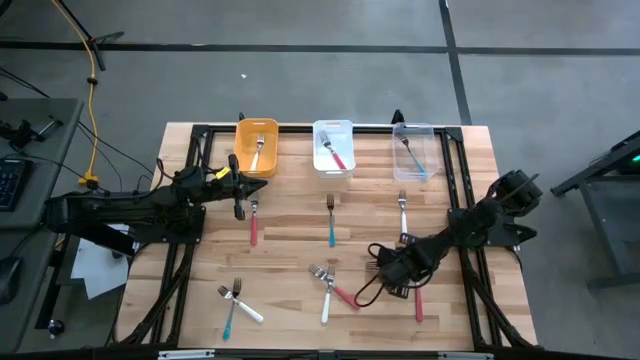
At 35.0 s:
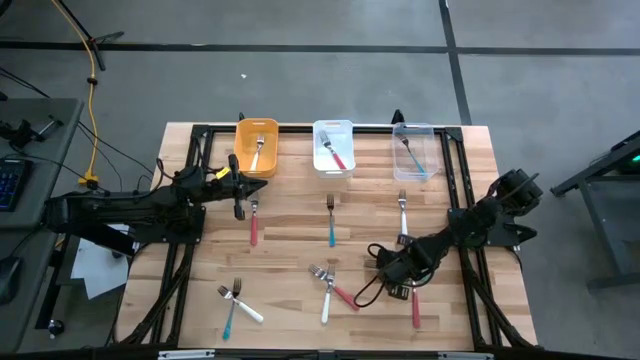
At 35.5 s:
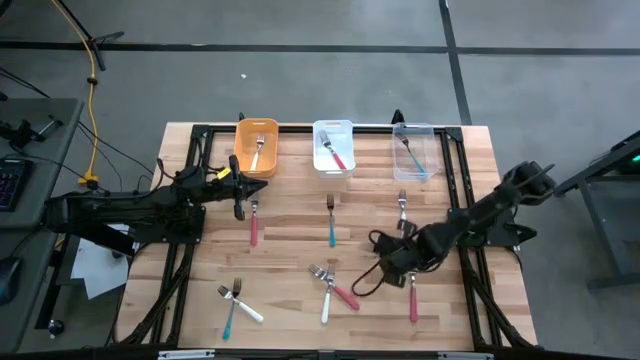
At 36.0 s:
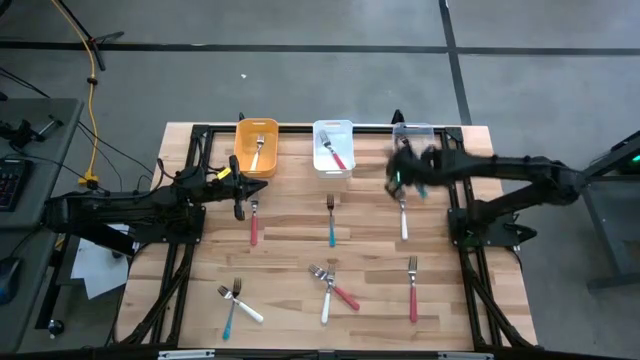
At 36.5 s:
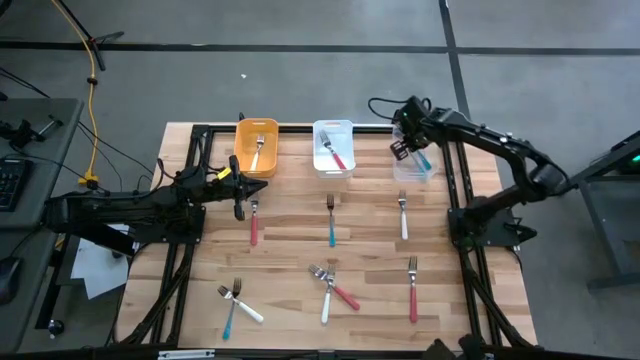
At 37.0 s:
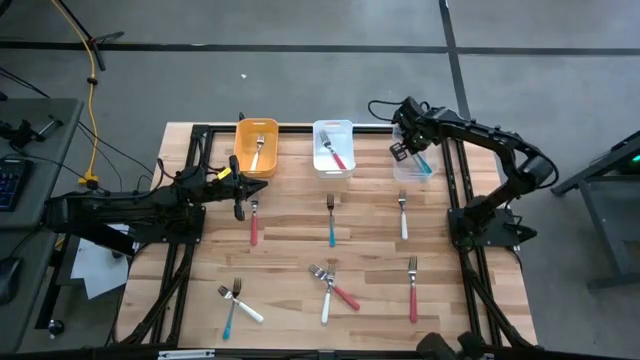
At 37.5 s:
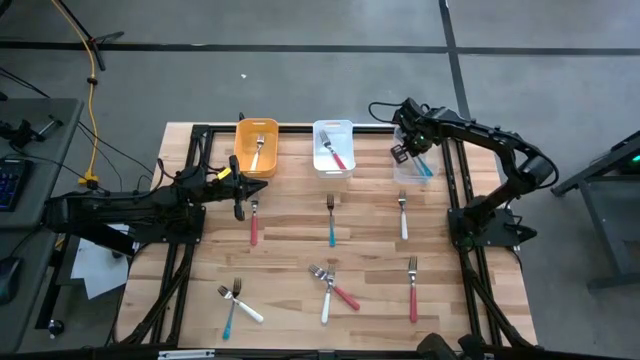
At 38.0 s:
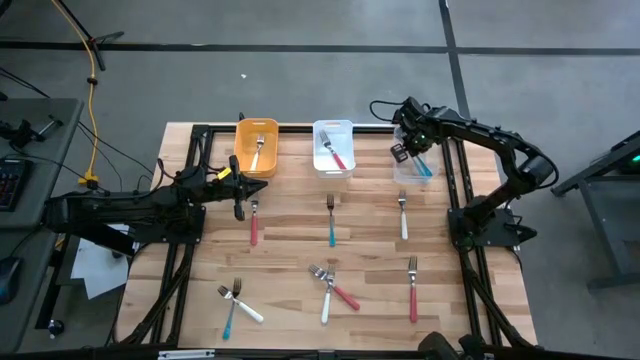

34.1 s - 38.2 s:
Task: Sort silverware by color (type)
Put the bottom right blue fork into the transparent bin

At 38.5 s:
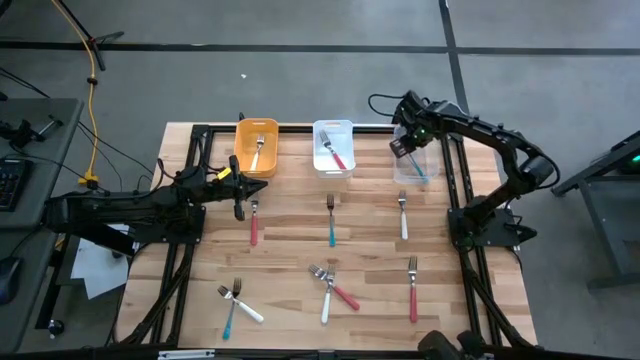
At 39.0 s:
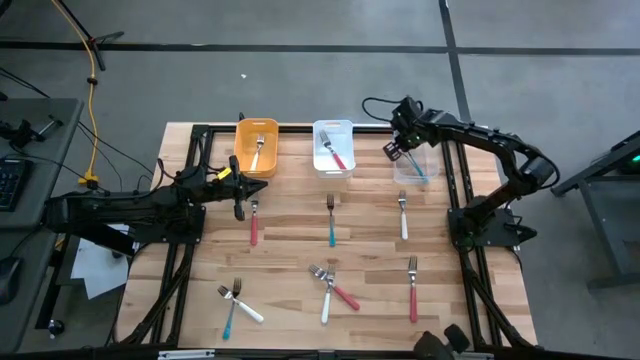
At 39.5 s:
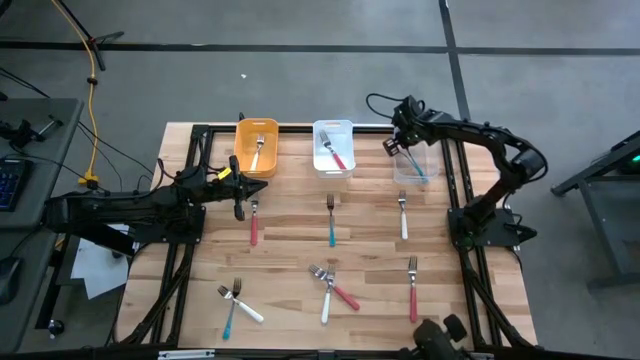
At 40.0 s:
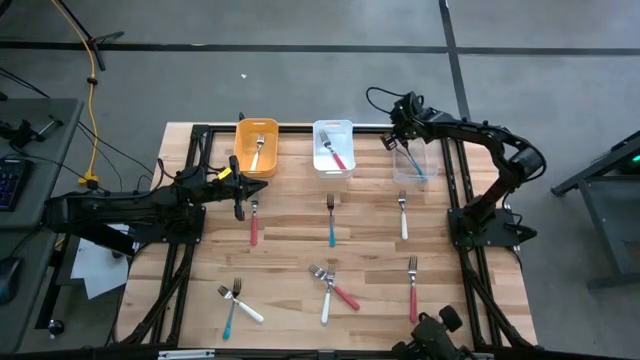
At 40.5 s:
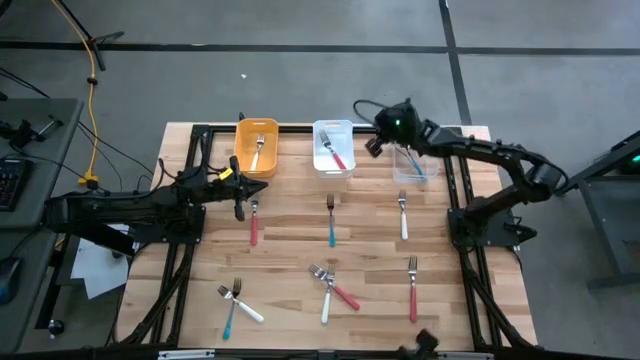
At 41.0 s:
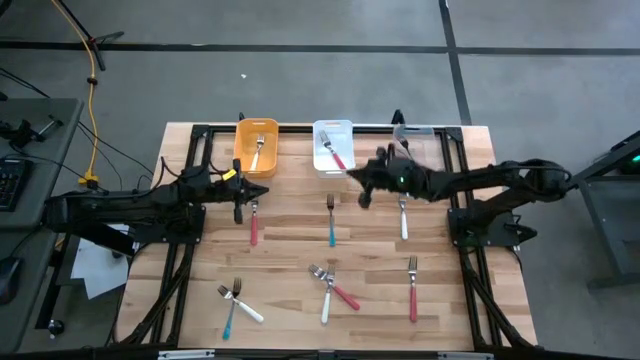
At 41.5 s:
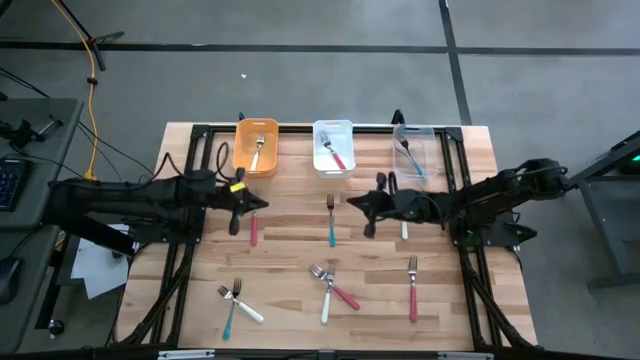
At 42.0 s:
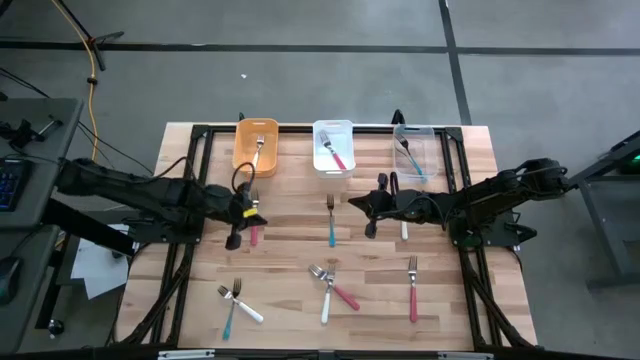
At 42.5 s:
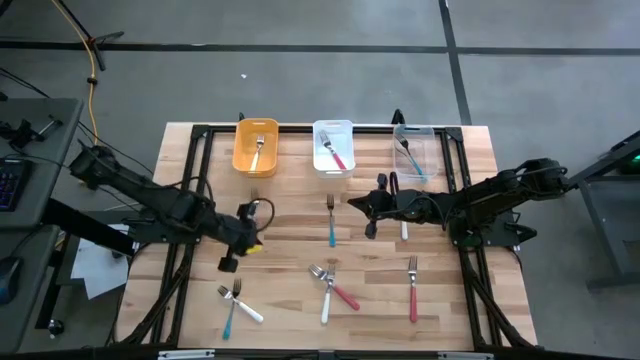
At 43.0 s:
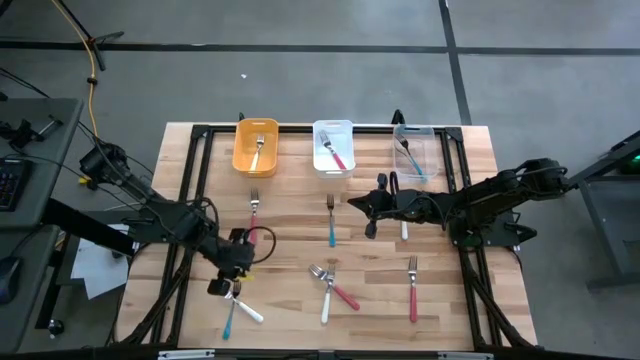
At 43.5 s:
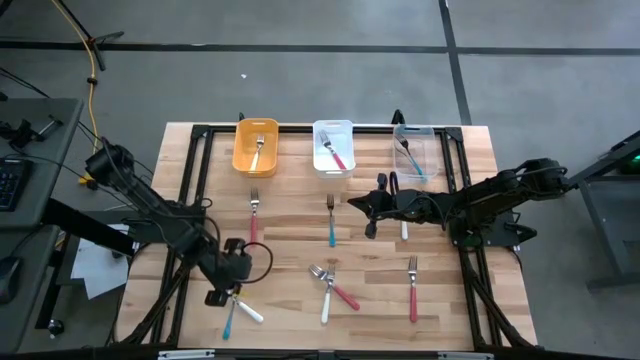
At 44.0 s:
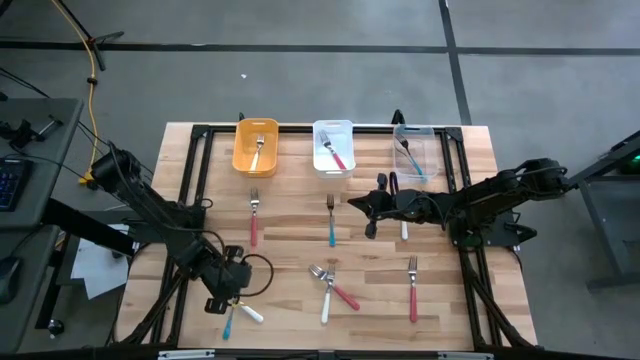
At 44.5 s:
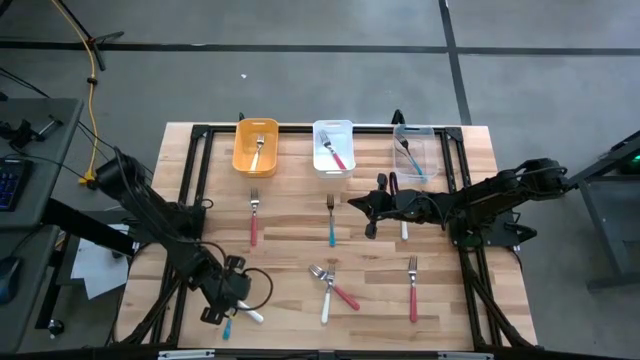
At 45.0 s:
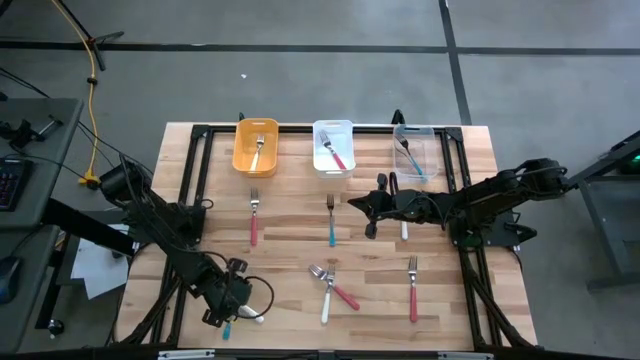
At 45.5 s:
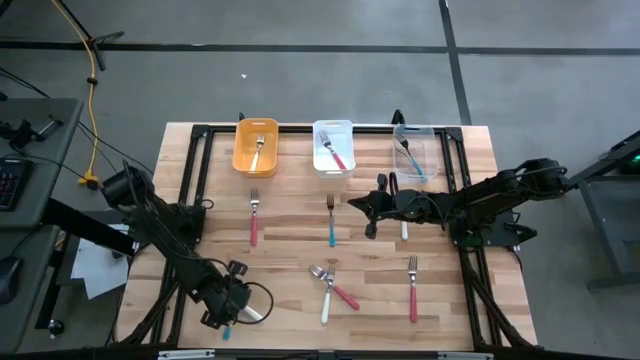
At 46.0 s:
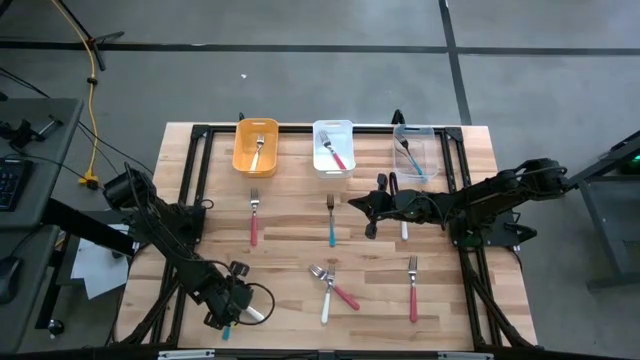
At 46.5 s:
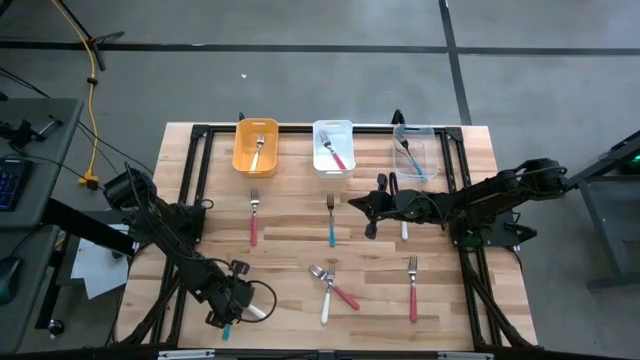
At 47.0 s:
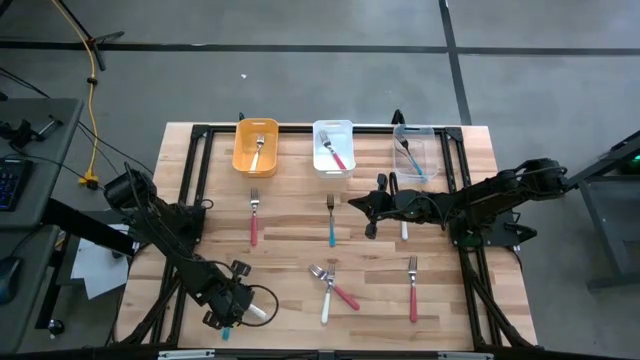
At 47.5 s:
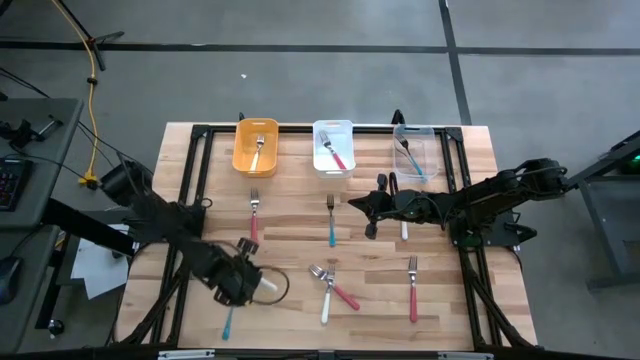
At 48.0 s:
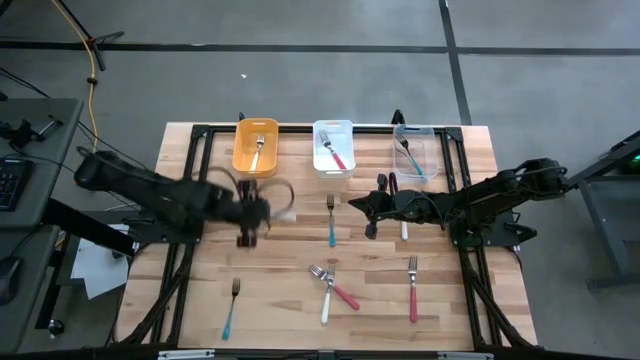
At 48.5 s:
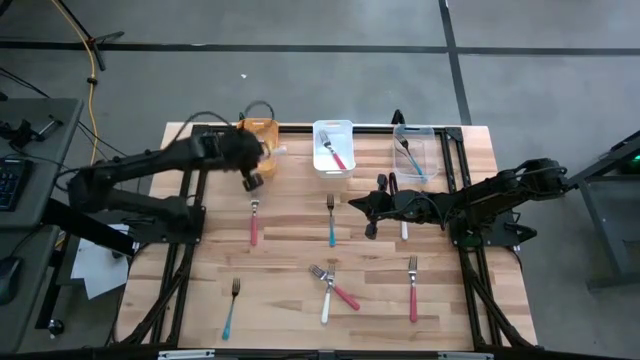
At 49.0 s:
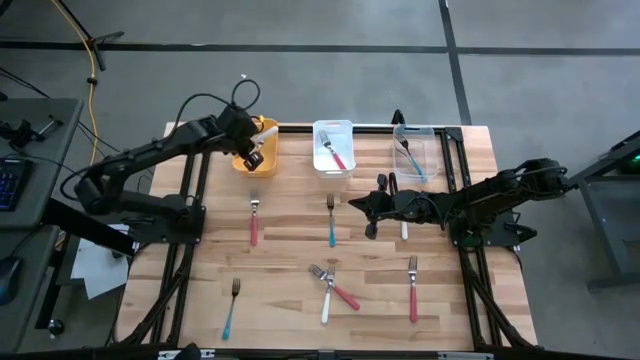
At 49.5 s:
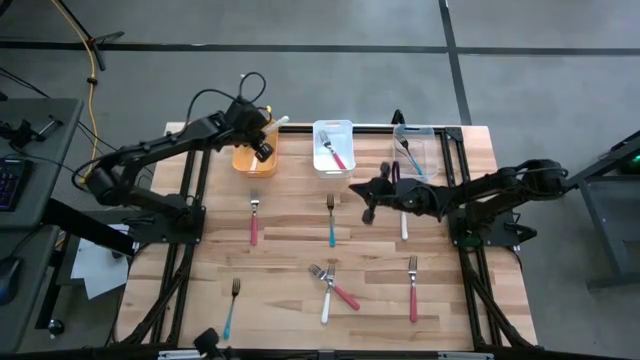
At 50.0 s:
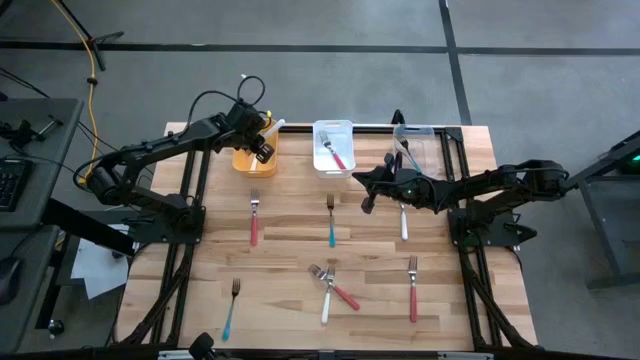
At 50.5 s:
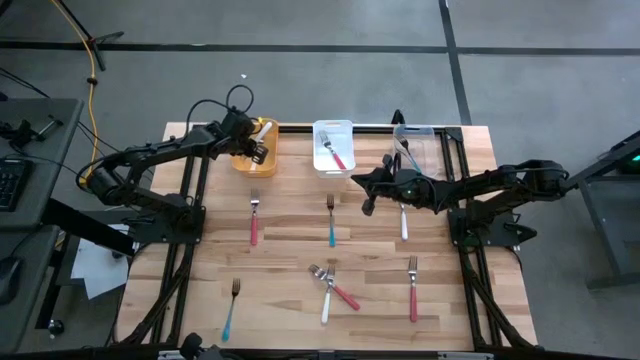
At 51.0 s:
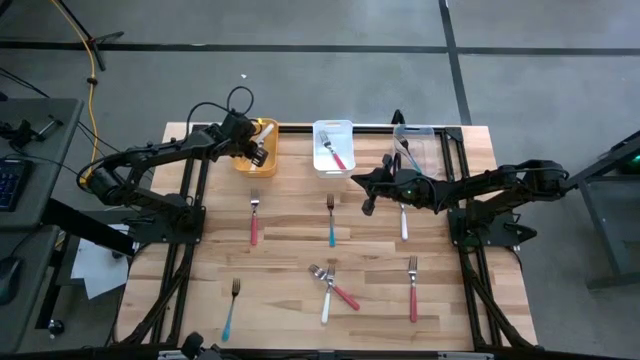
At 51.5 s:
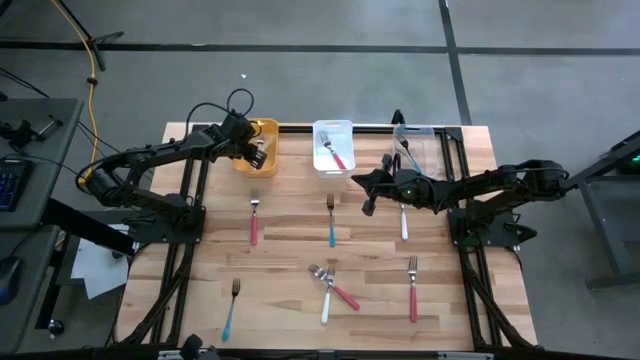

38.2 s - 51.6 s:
Put the bottom left white fork into the yellow bin

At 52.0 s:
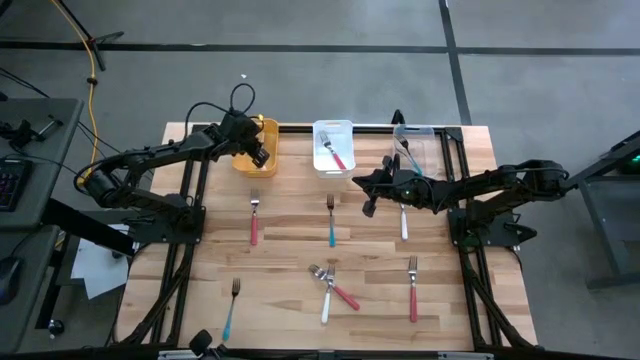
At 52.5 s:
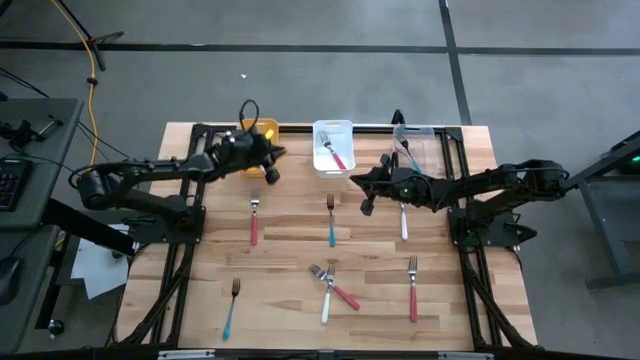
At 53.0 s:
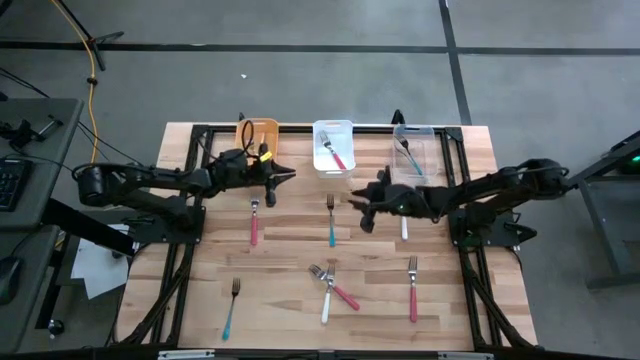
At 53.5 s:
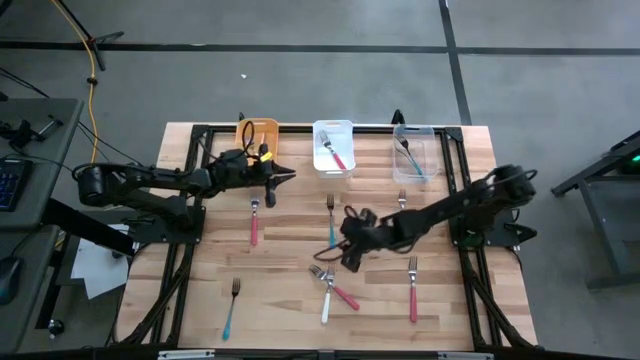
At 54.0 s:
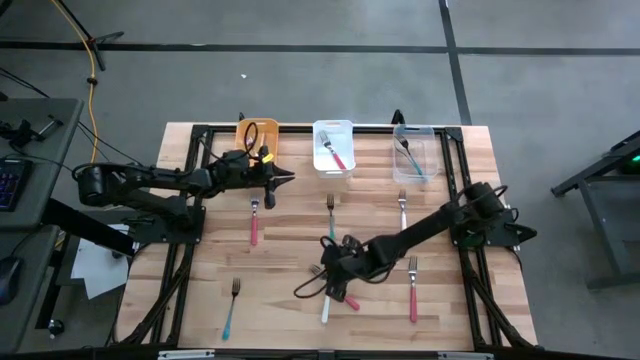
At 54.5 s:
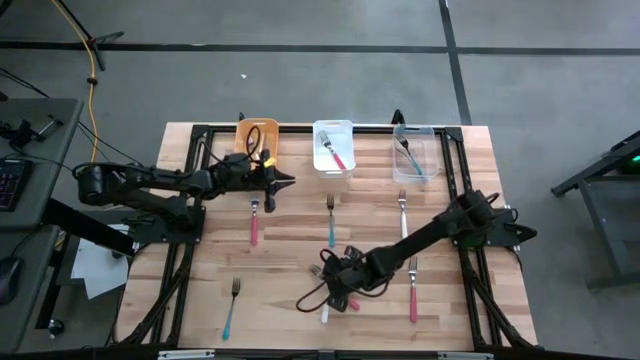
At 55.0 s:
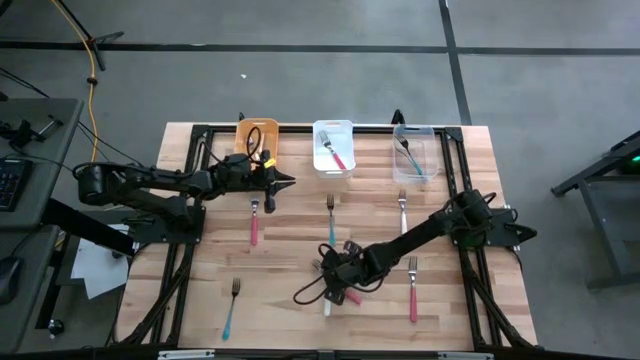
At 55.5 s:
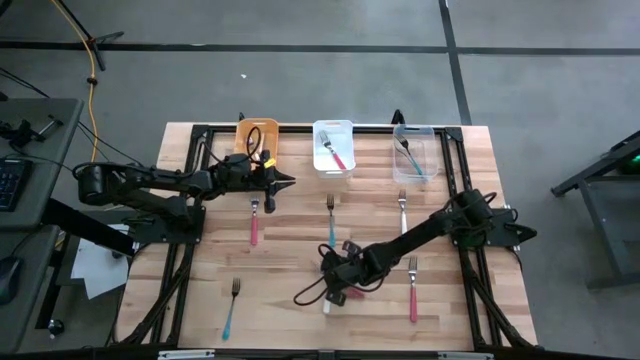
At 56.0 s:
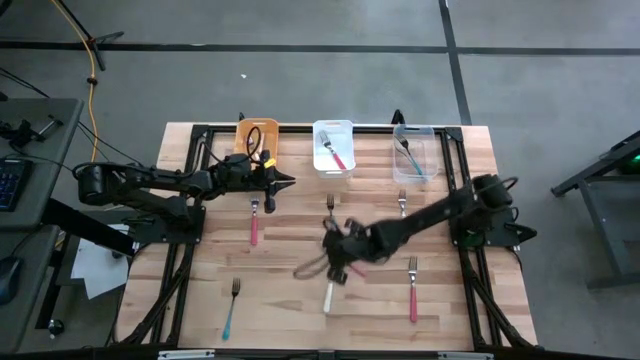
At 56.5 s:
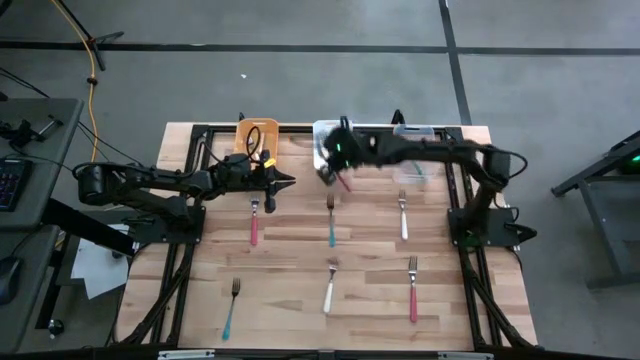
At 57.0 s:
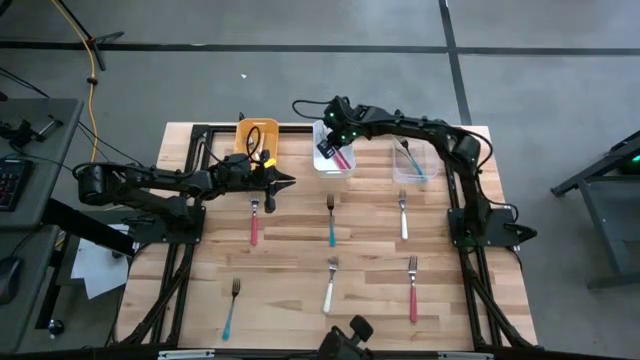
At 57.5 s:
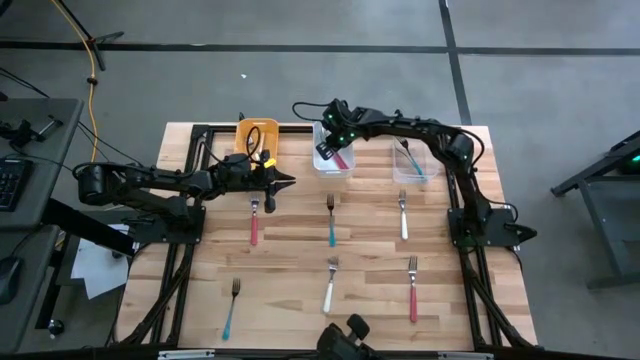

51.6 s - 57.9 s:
Put the bottom left pink fork into the white bin
